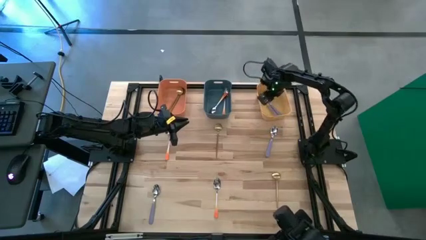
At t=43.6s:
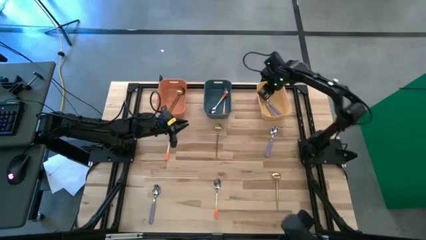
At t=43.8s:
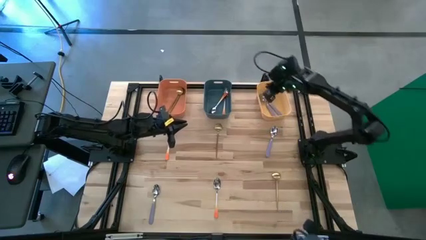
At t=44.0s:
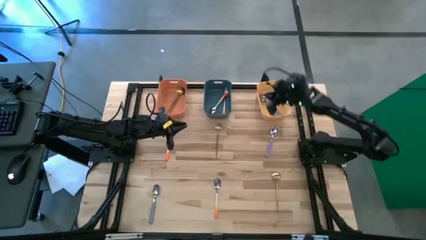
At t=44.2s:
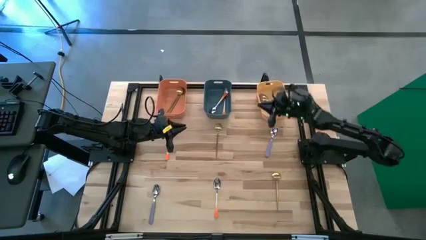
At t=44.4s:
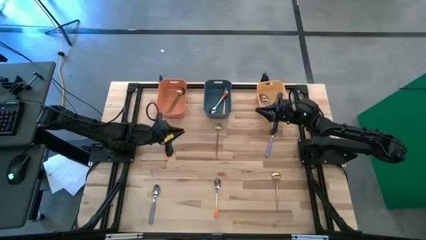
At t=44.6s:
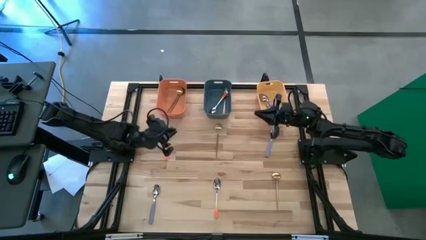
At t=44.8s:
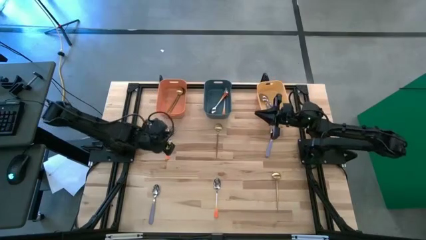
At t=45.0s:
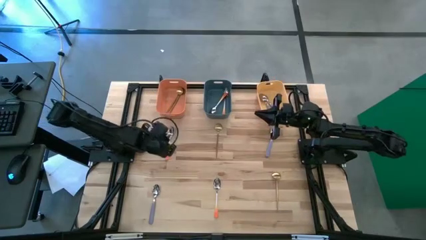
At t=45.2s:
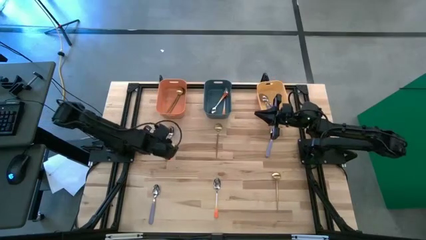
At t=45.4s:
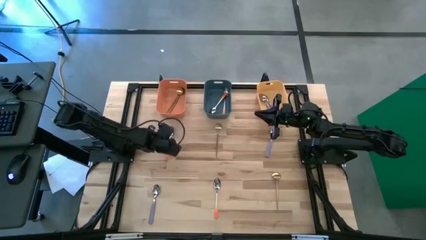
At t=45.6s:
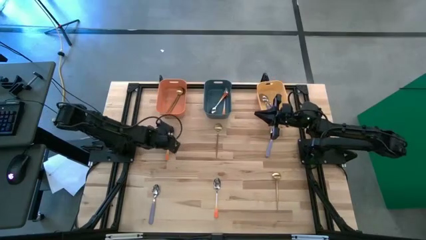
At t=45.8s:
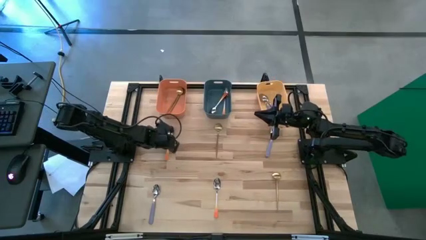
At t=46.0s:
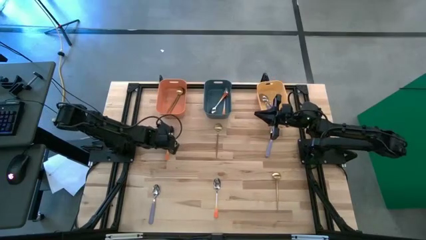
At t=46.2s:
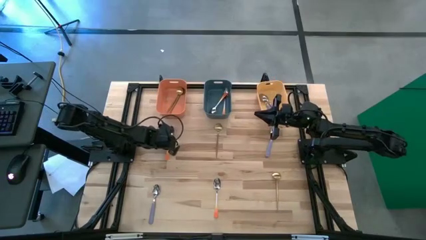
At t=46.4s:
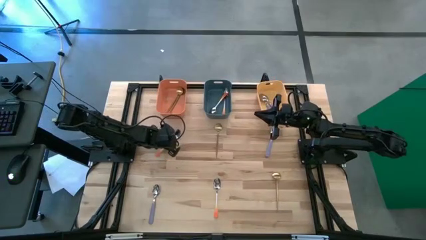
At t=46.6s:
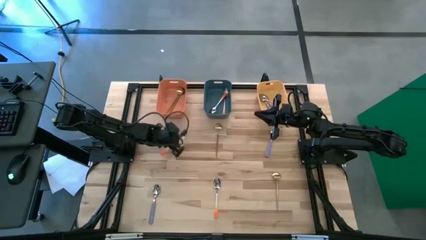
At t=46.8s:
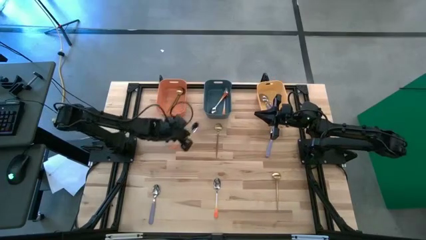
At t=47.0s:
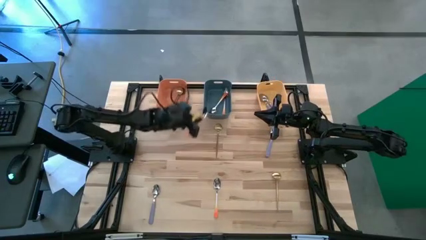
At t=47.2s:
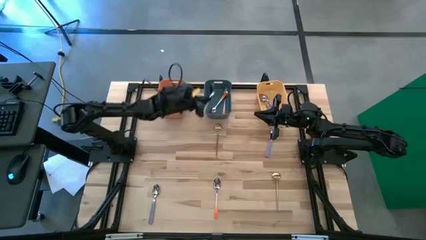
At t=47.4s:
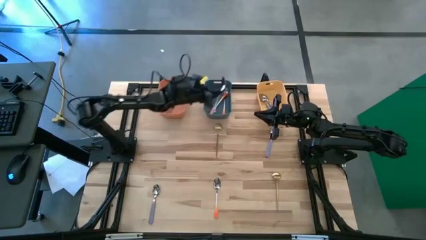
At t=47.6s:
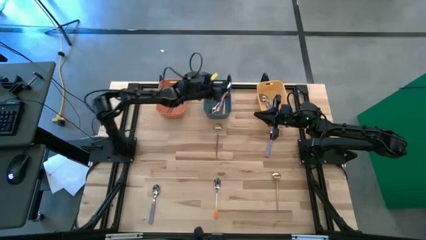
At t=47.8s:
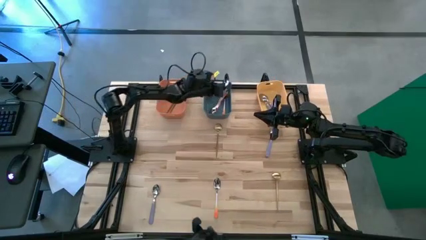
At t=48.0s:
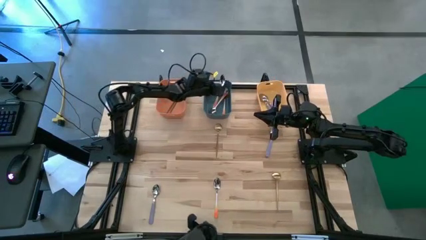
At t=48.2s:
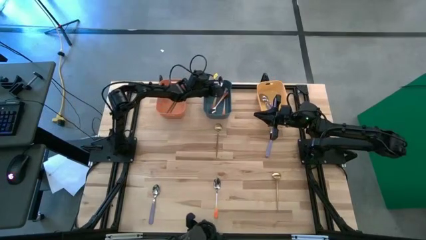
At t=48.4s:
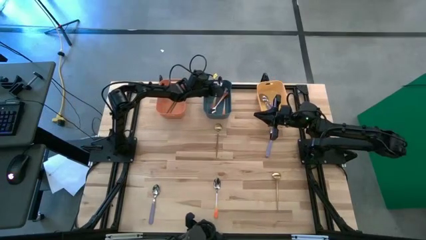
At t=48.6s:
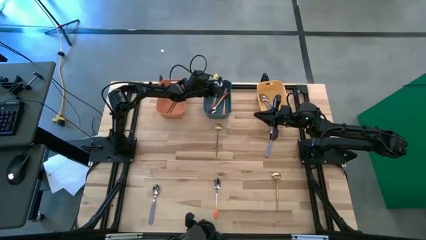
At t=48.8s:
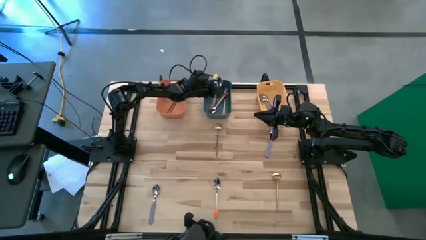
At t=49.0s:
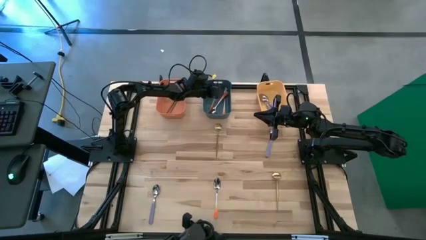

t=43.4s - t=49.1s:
Task: Sort silverware by color (type)
Put the orange spoon into the blue bin

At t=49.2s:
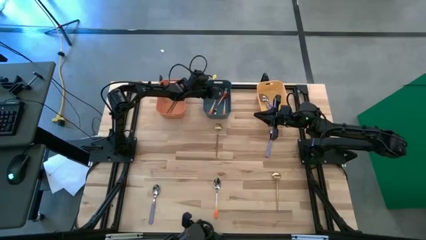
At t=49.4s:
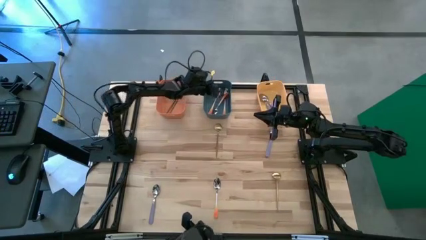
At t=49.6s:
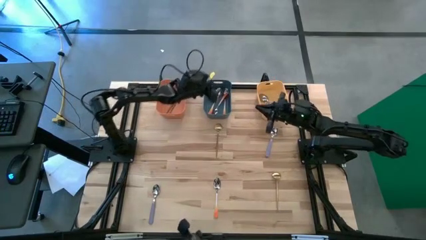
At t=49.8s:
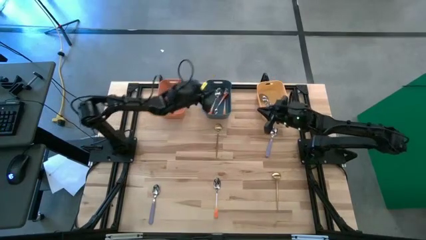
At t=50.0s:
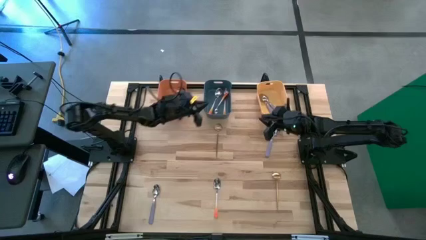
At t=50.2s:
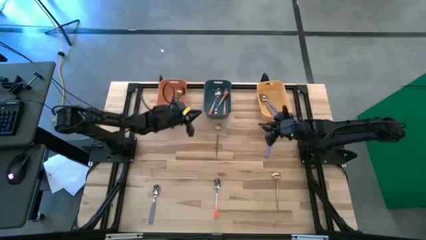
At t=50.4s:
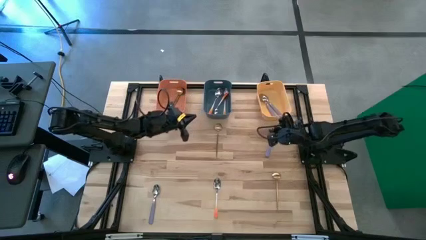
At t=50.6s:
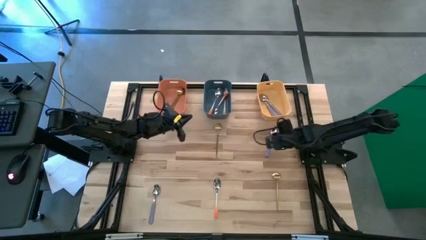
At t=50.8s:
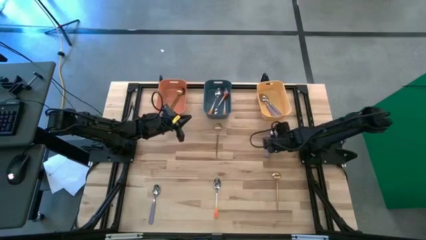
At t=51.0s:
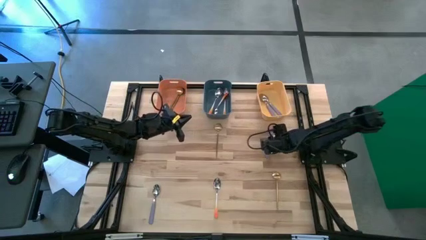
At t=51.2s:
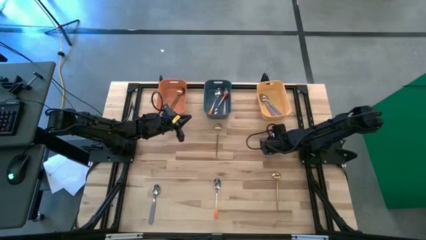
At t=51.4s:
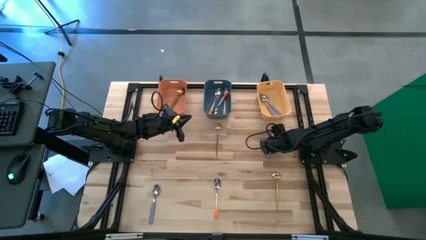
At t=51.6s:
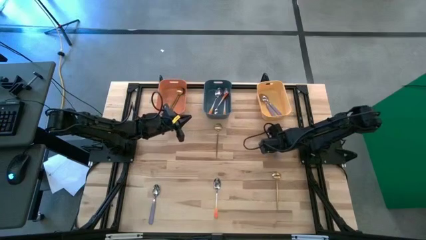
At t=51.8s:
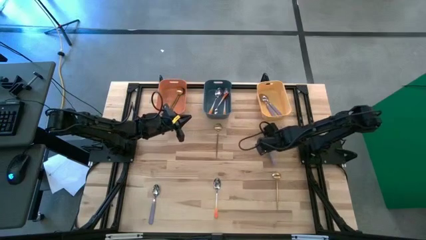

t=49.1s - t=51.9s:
Put the purple spoon into the yellow bin

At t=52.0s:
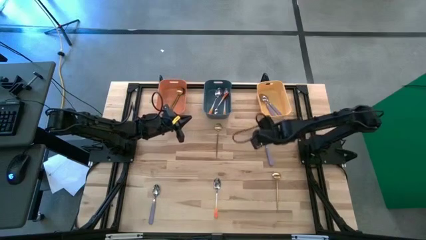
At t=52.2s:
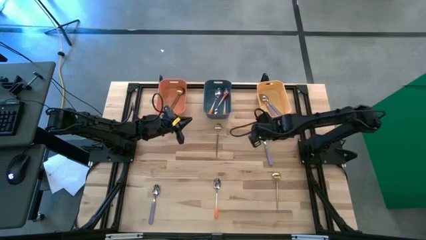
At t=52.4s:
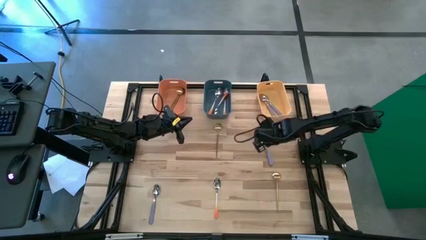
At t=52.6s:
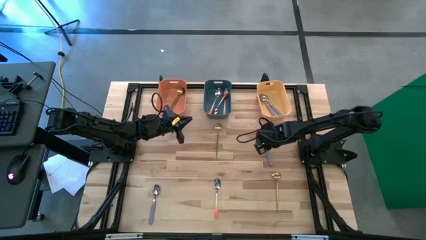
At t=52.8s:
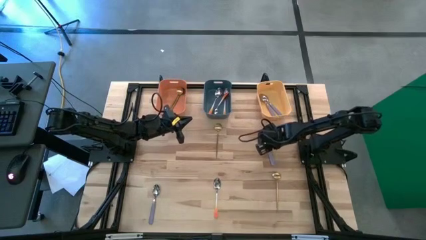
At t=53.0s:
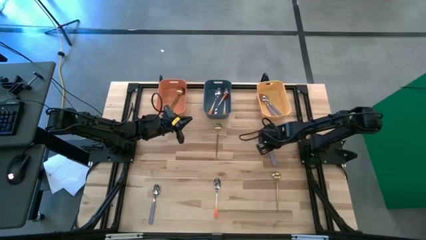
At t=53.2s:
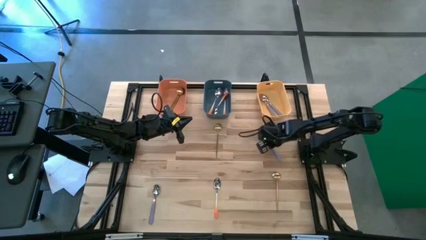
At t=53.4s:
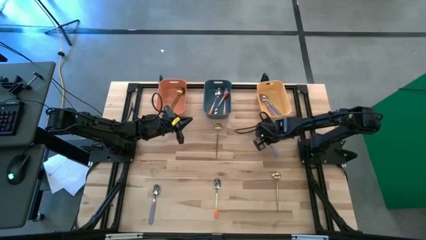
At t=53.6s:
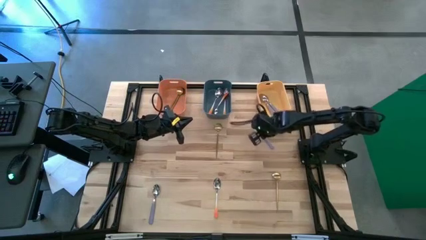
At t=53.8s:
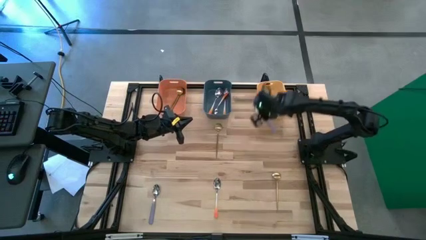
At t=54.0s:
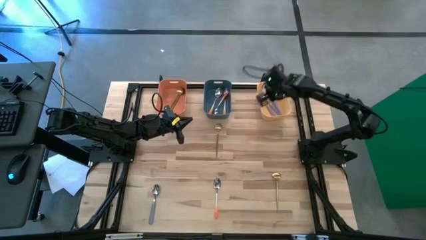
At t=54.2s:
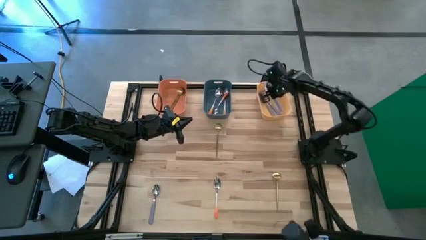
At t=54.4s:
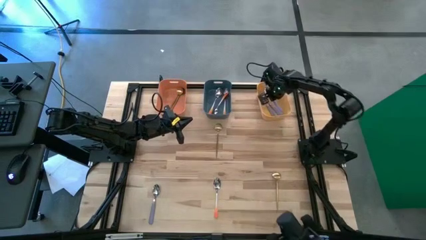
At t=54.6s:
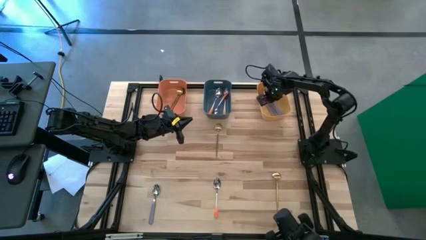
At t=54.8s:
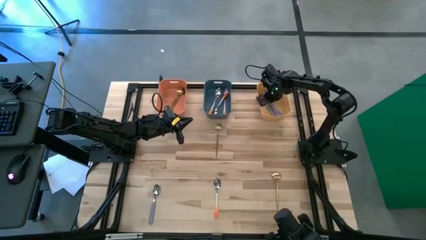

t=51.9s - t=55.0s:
Put the purple spoon into the yellow bin

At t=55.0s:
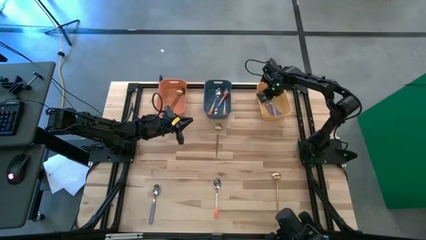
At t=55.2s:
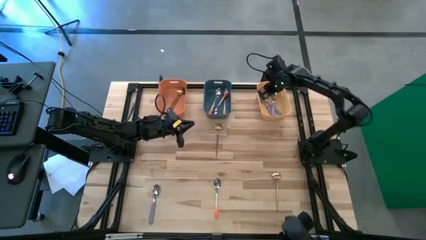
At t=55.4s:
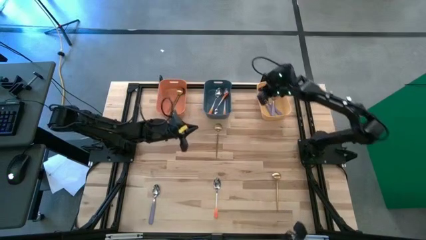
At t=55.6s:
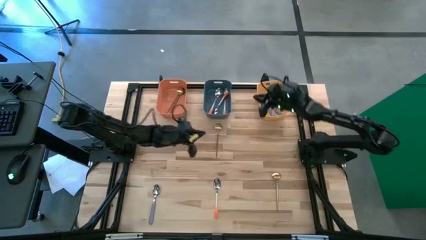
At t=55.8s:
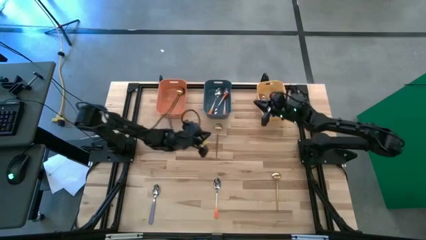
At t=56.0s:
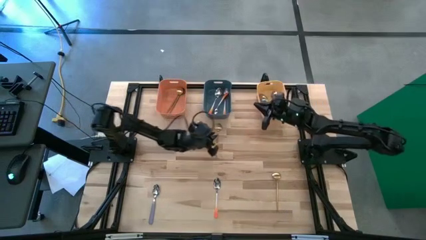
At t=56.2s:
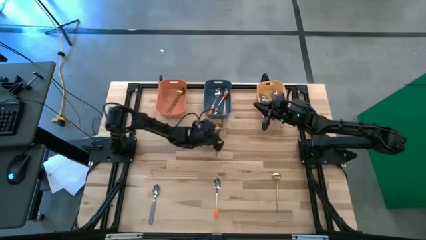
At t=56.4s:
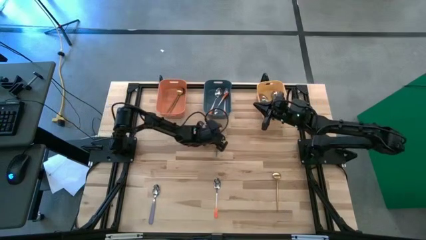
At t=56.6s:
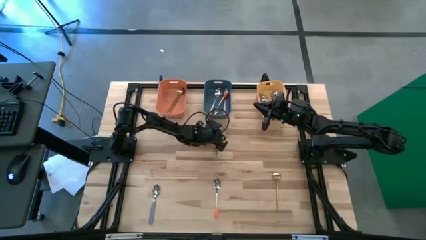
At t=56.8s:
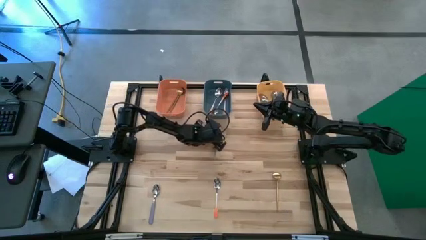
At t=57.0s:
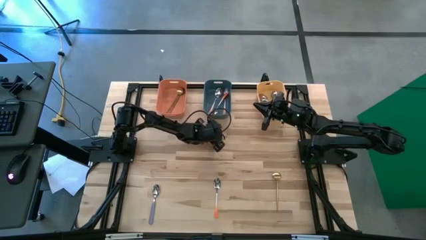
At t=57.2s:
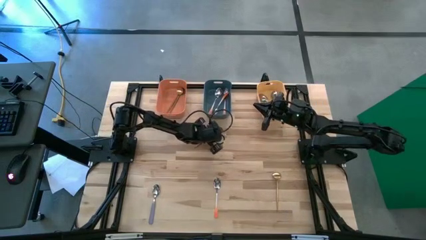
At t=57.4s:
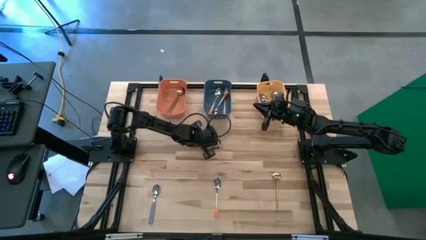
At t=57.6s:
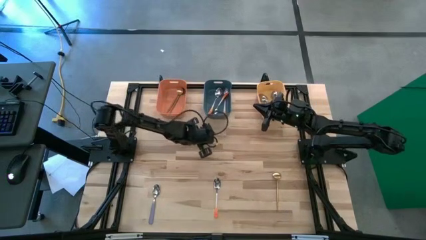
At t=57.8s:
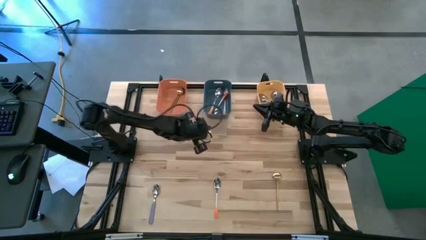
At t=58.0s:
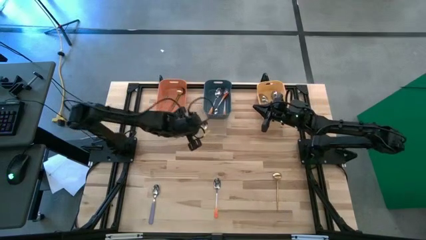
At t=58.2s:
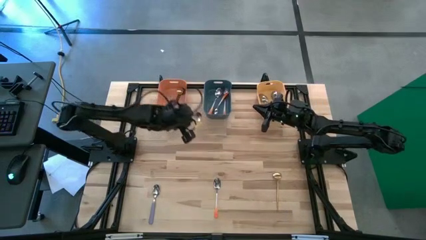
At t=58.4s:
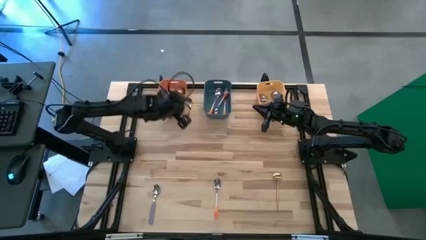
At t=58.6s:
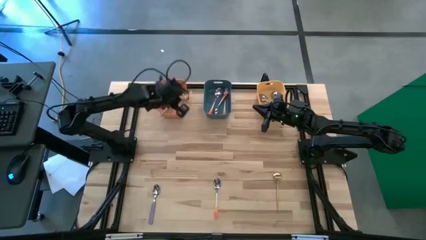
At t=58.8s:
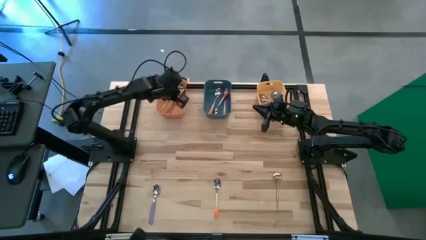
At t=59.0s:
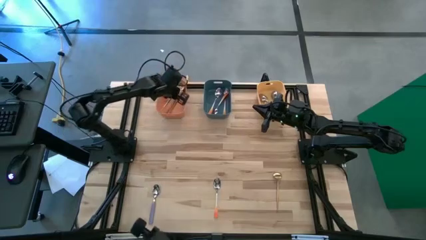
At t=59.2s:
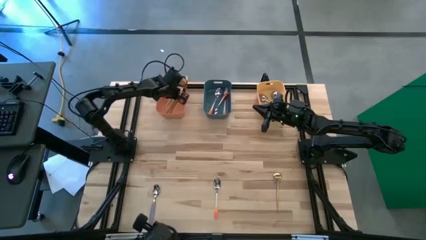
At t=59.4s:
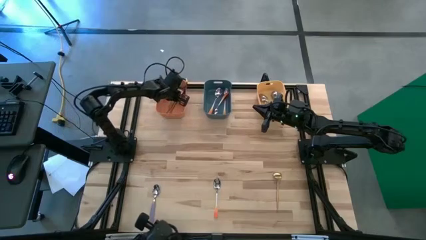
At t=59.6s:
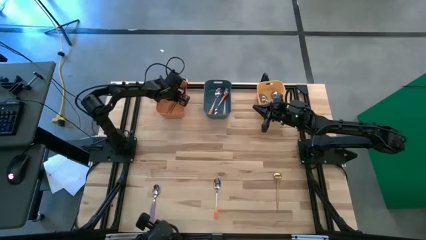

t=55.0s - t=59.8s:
Put the gold spoon into the orange bin
